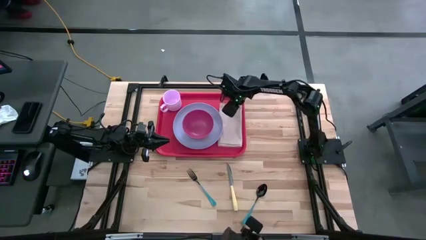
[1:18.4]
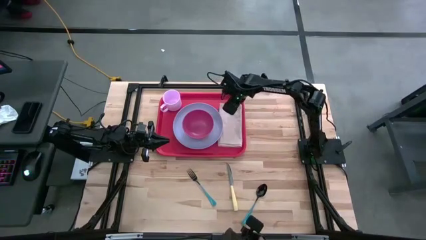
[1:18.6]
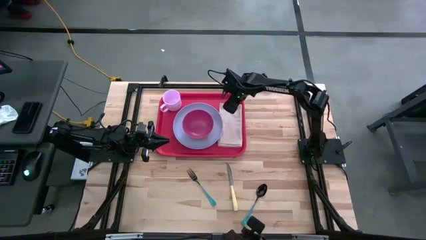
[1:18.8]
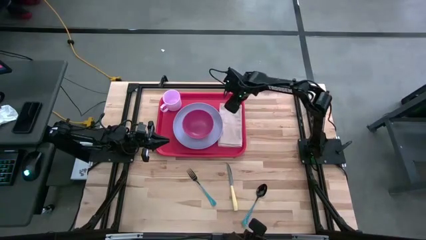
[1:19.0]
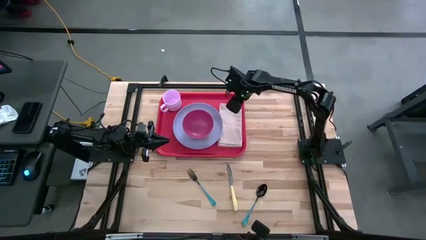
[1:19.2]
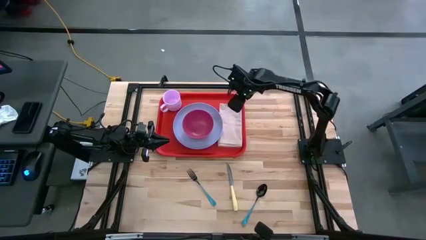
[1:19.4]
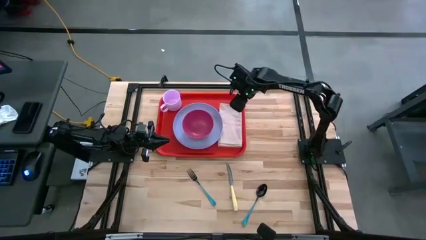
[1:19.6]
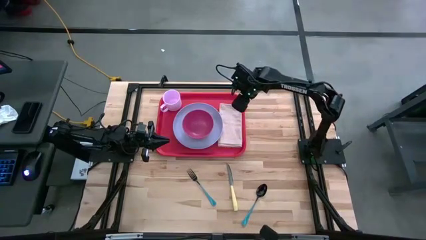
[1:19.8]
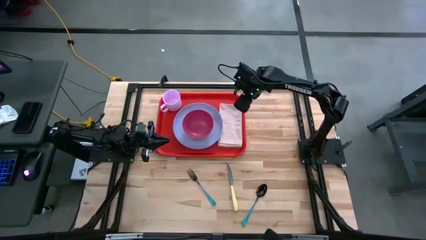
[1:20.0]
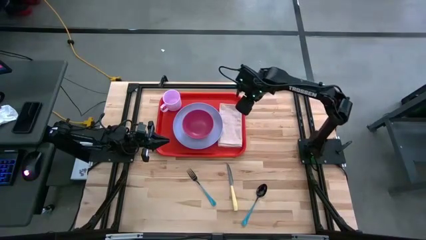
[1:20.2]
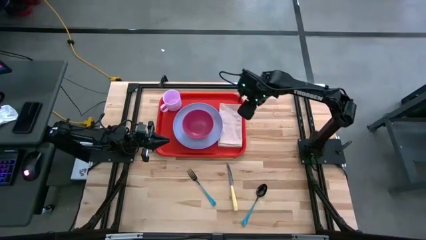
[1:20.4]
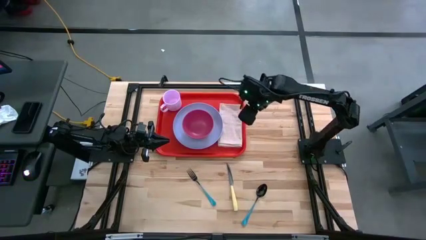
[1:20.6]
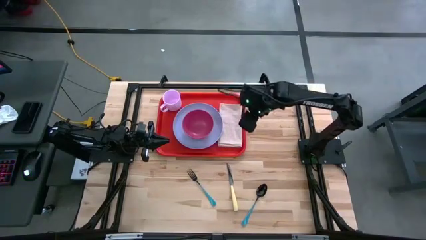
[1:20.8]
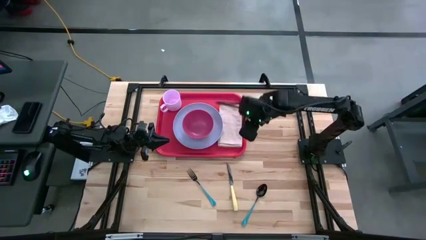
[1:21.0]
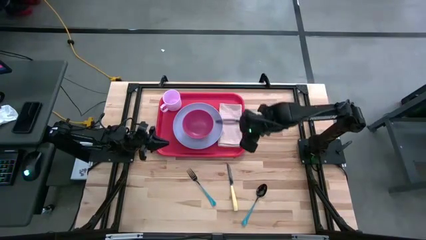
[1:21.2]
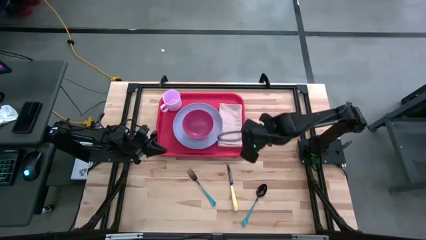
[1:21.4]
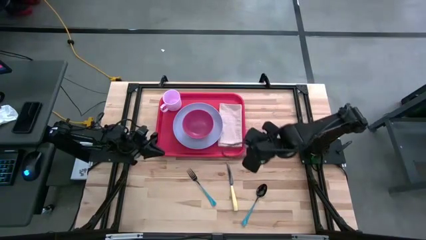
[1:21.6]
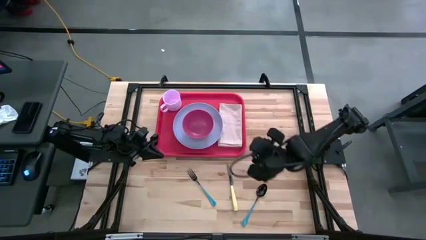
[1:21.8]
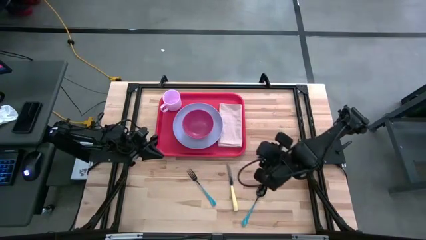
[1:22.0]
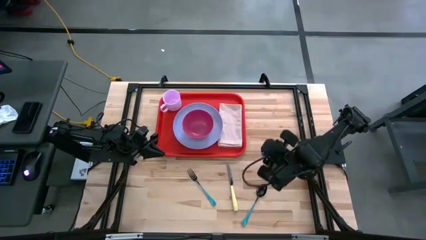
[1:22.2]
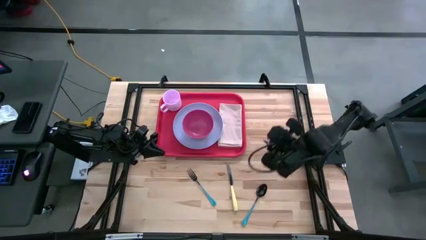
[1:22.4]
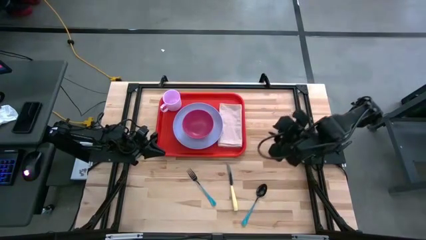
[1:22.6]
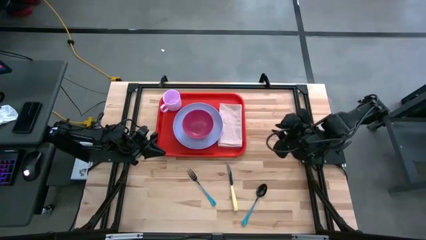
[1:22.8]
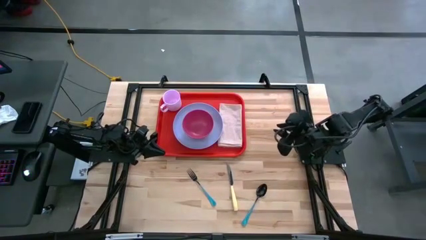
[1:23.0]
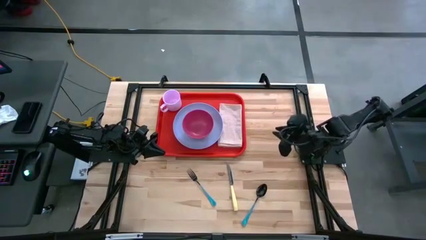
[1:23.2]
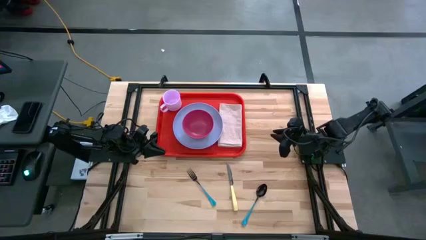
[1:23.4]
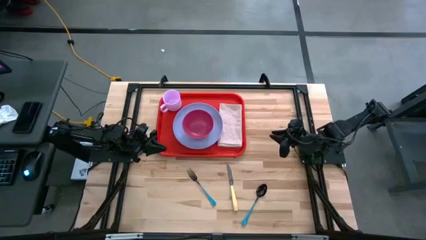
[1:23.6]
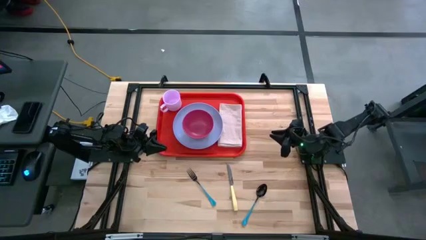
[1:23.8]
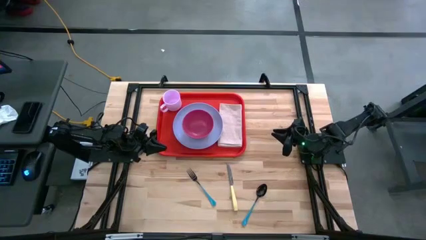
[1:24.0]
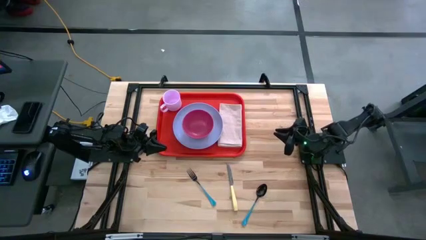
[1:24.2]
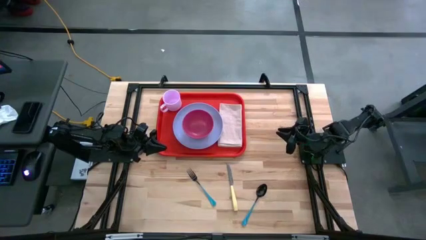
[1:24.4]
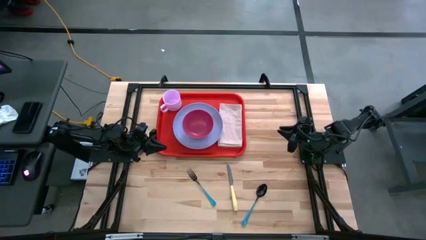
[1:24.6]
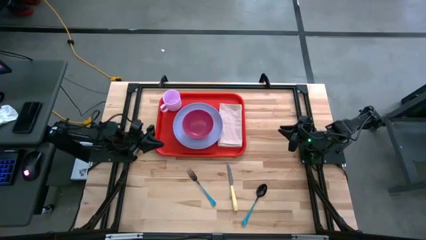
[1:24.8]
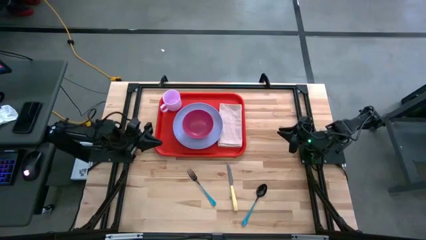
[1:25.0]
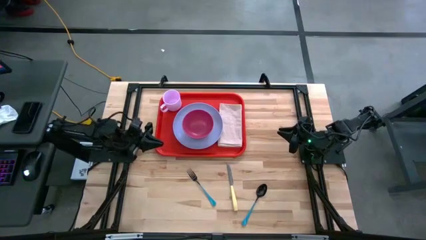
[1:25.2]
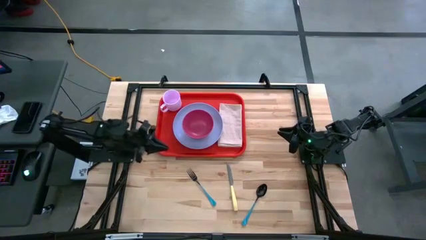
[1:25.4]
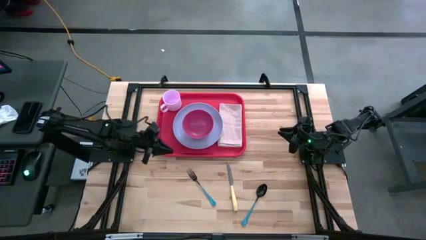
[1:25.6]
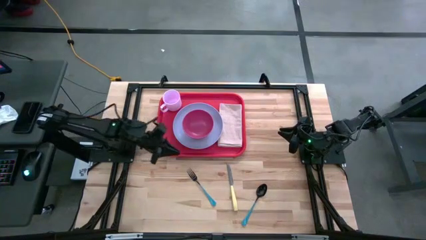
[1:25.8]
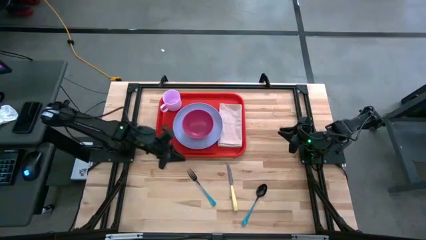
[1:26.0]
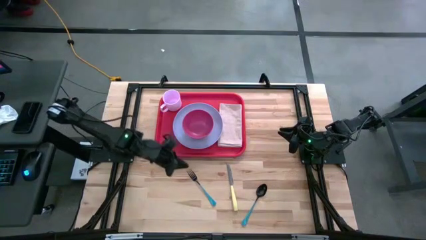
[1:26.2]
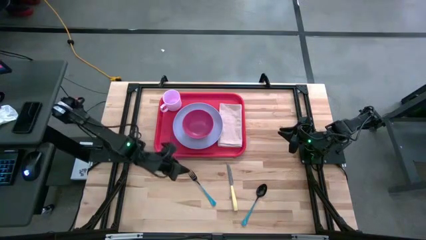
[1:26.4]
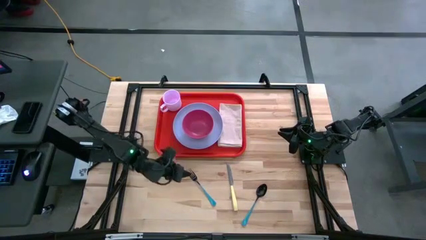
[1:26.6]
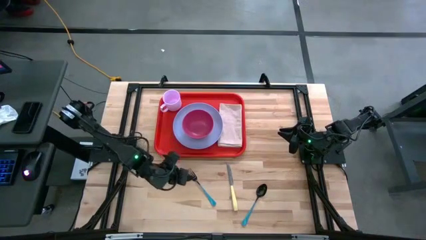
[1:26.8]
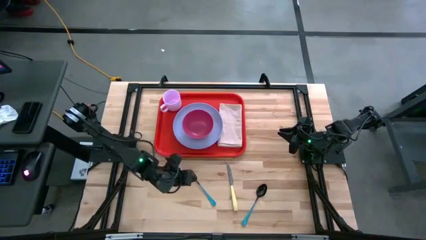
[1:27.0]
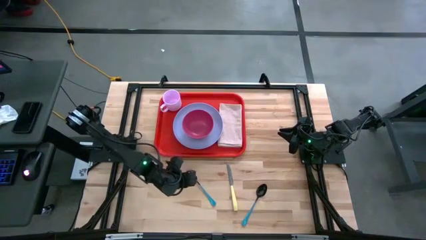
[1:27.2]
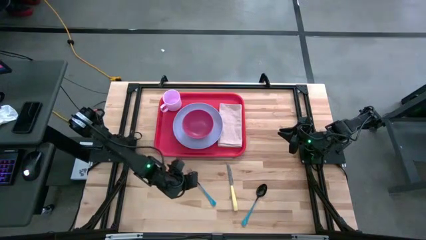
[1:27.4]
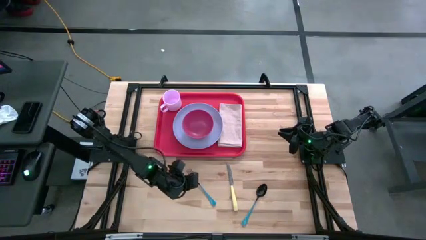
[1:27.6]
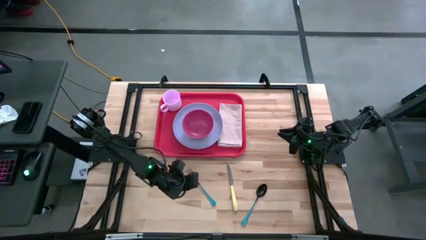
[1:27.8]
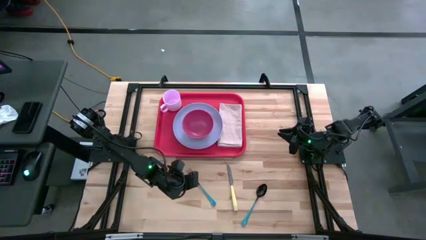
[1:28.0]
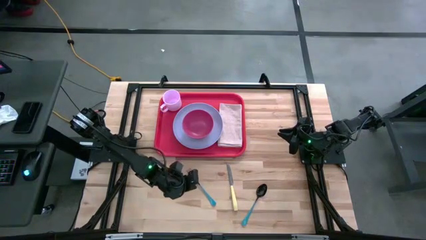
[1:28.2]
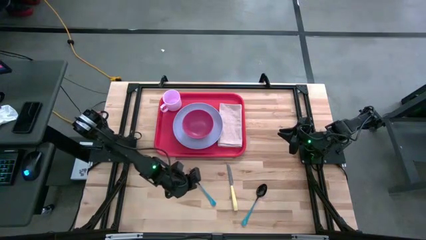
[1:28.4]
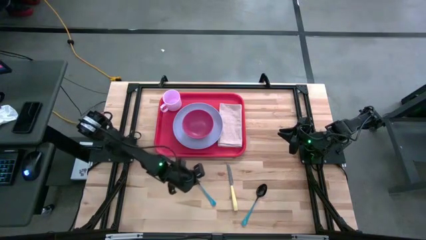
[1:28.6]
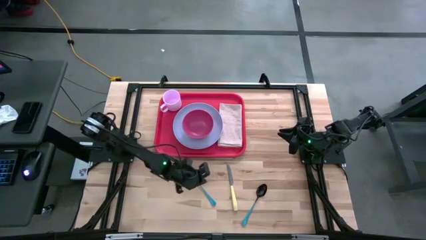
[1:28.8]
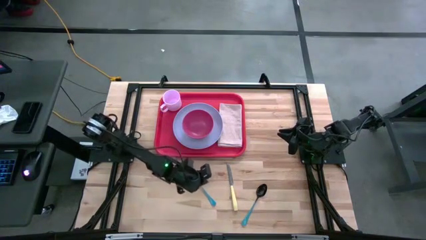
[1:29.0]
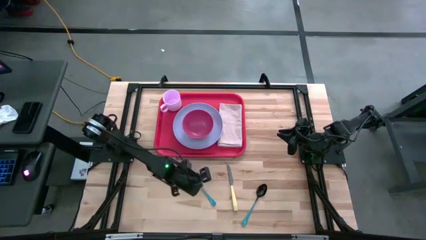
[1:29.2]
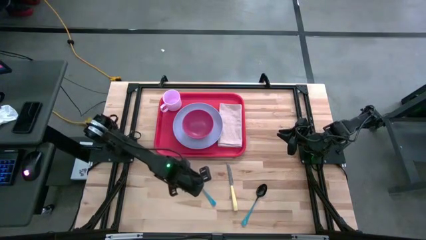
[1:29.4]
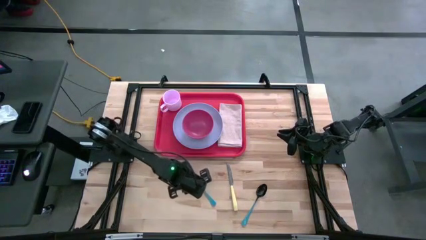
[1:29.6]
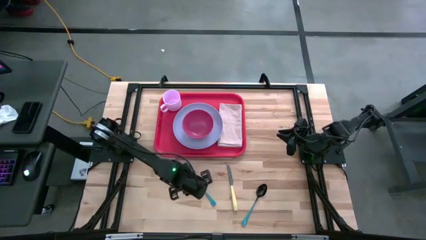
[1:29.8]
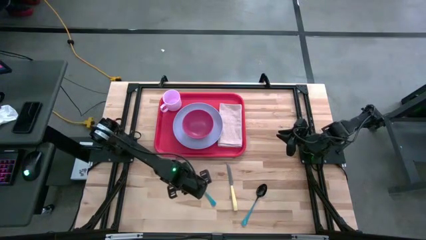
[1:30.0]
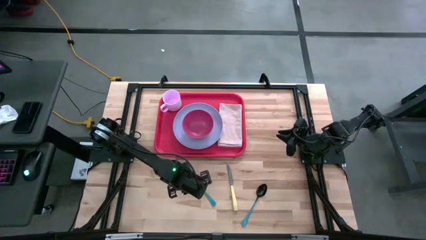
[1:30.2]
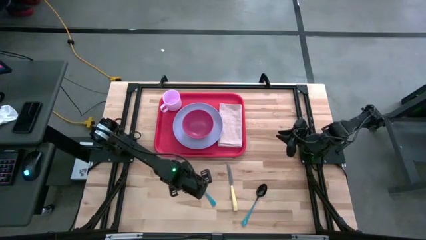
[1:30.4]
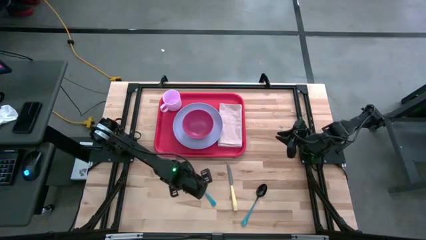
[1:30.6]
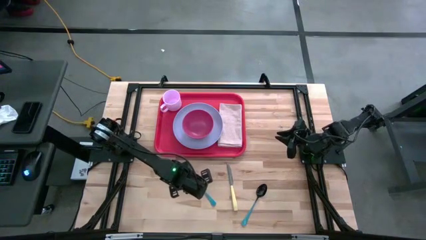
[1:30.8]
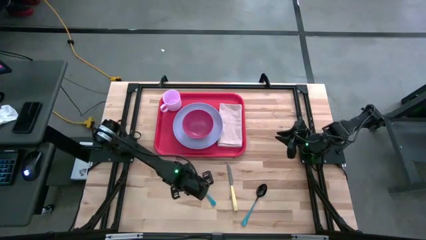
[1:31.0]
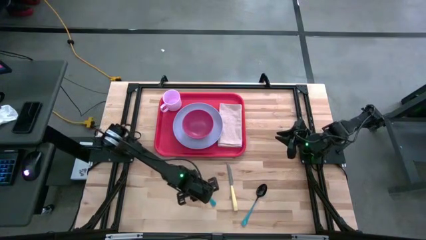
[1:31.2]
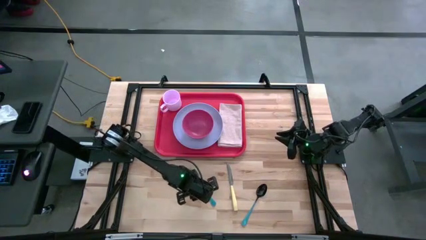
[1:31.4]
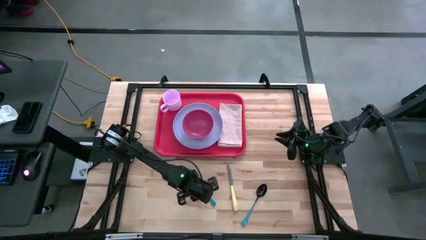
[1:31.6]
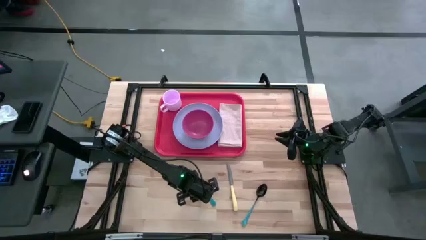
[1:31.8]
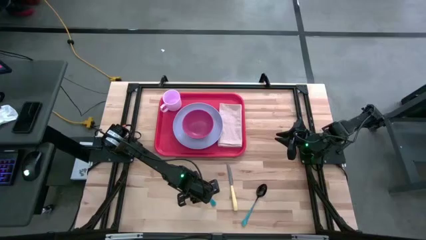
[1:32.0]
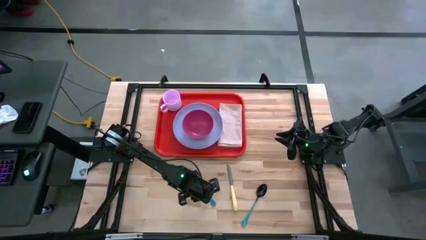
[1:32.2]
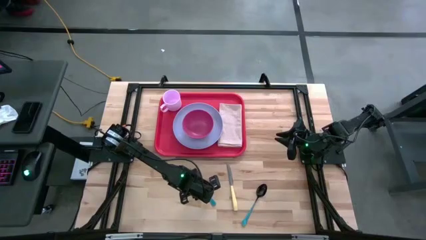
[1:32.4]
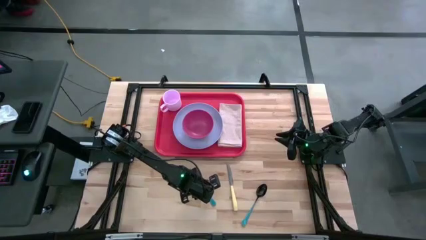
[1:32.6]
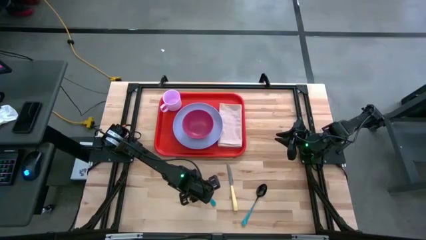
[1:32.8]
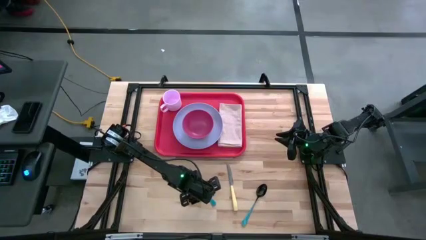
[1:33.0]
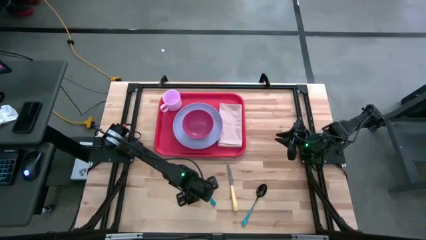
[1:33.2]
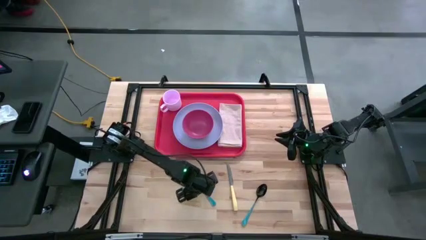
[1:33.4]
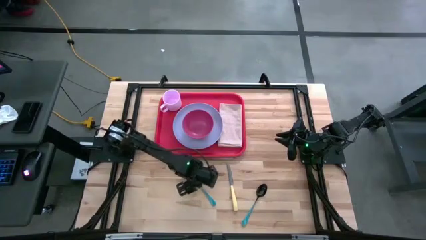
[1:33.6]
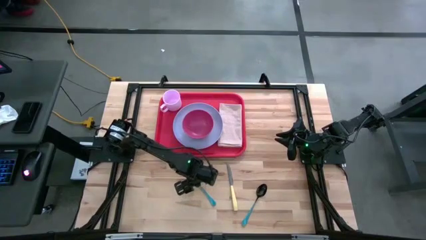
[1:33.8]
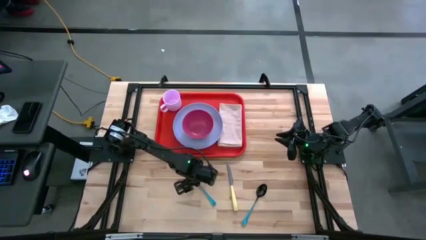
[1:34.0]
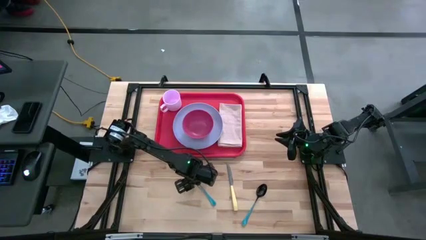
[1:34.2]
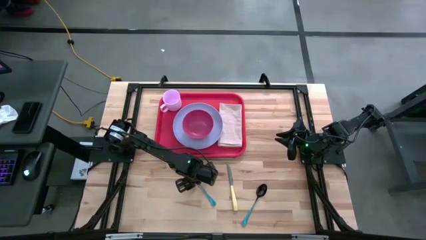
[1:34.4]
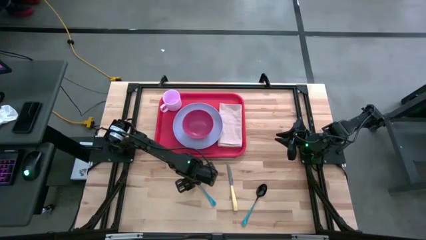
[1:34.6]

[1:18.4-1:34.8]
Task: Set up tray
Put the blue fork on the white table napkin to the right of the purple plate
